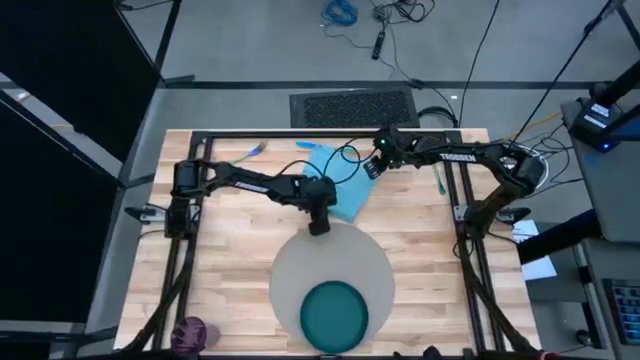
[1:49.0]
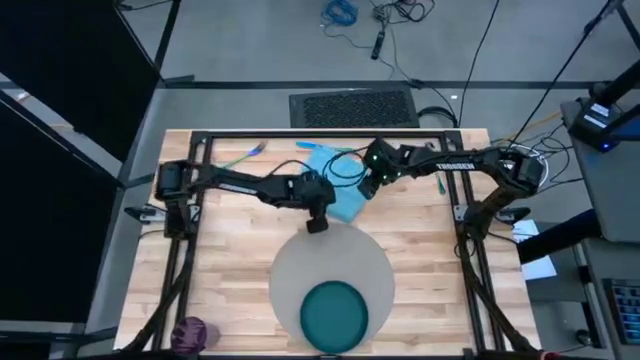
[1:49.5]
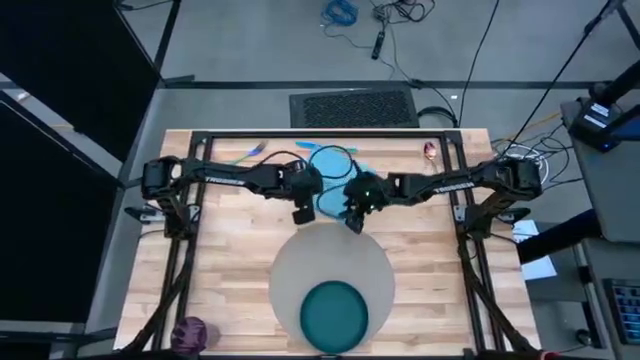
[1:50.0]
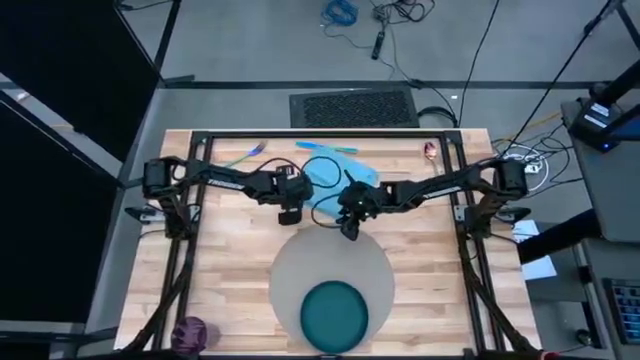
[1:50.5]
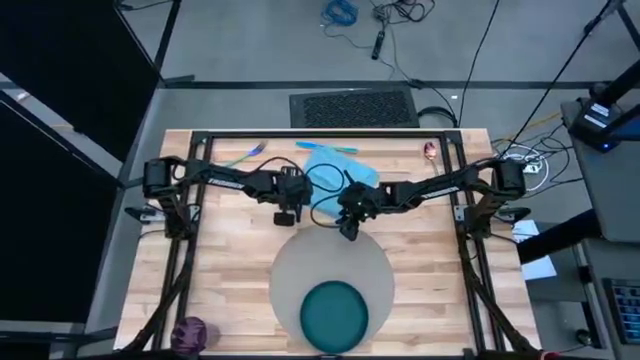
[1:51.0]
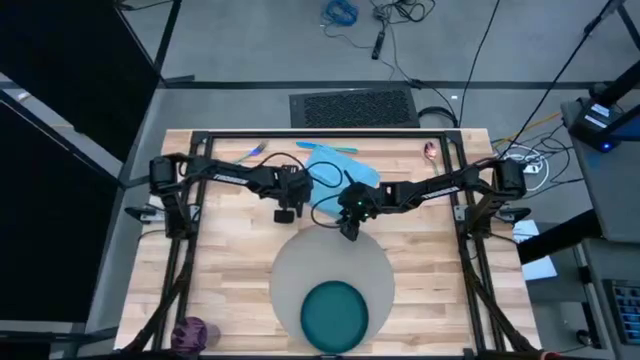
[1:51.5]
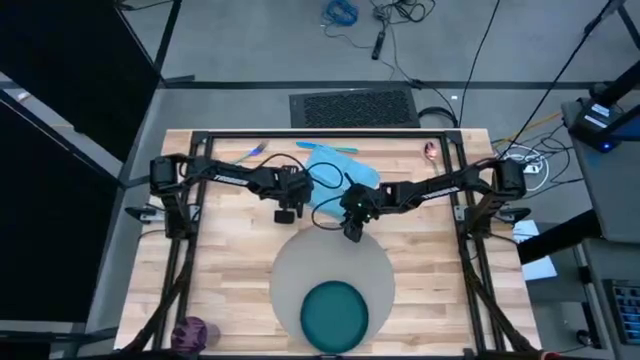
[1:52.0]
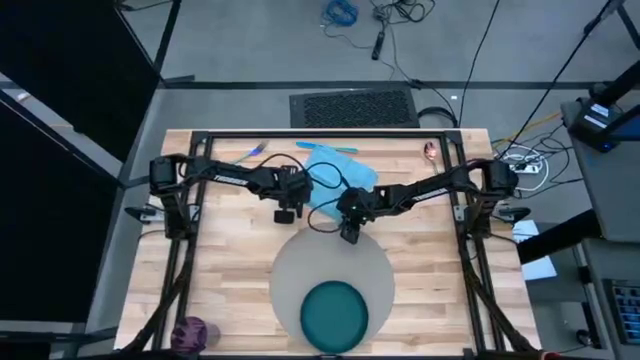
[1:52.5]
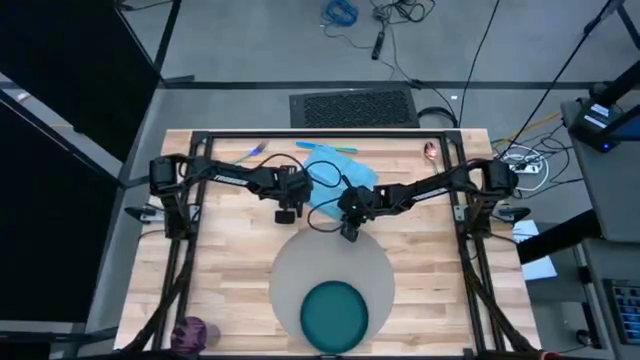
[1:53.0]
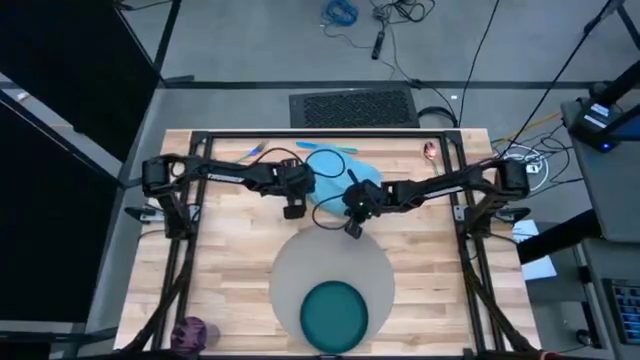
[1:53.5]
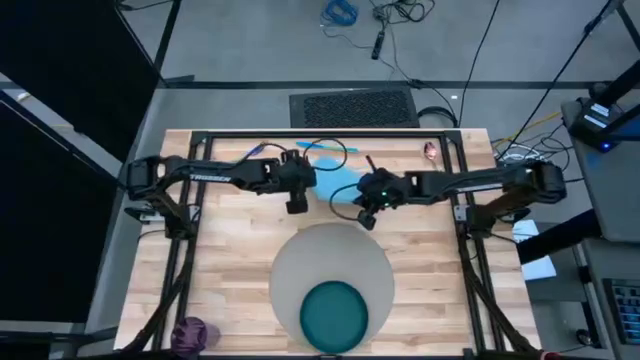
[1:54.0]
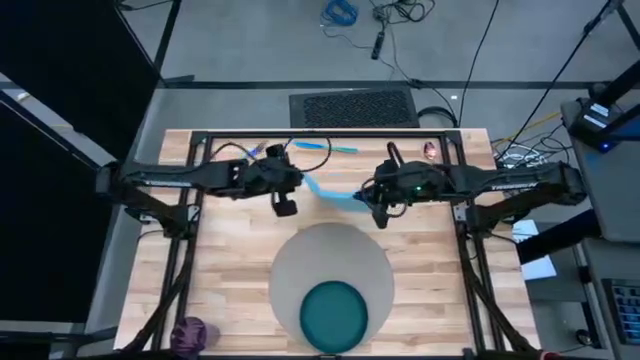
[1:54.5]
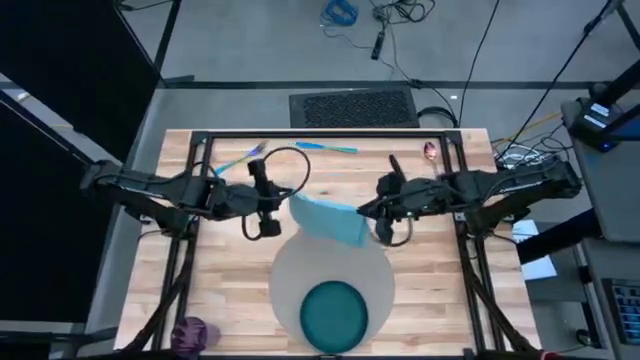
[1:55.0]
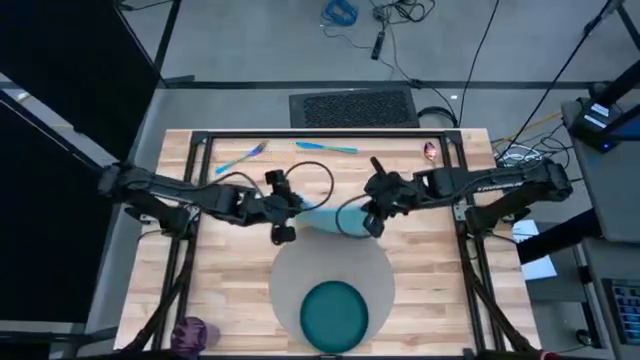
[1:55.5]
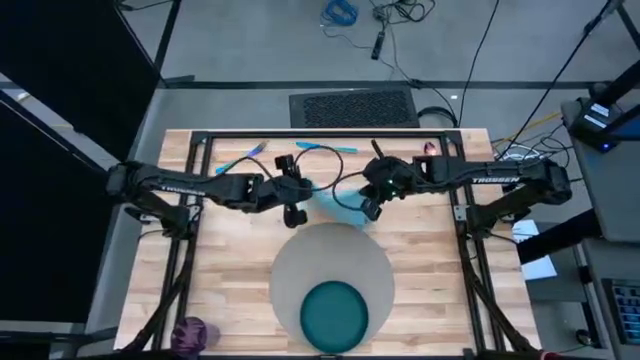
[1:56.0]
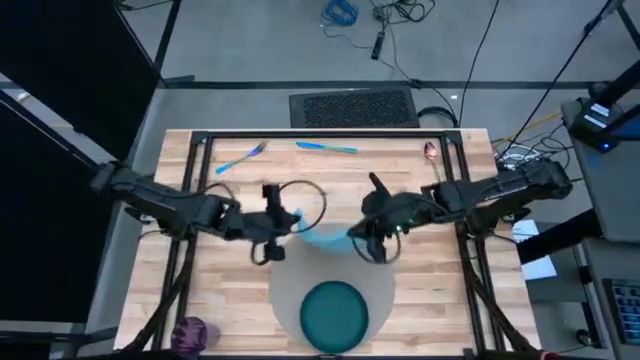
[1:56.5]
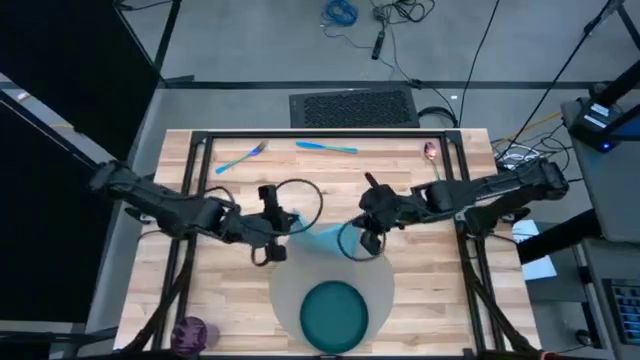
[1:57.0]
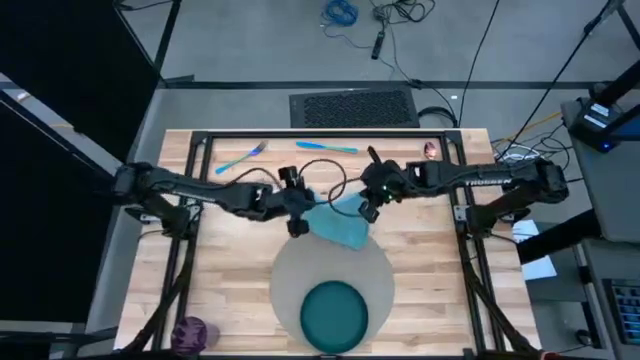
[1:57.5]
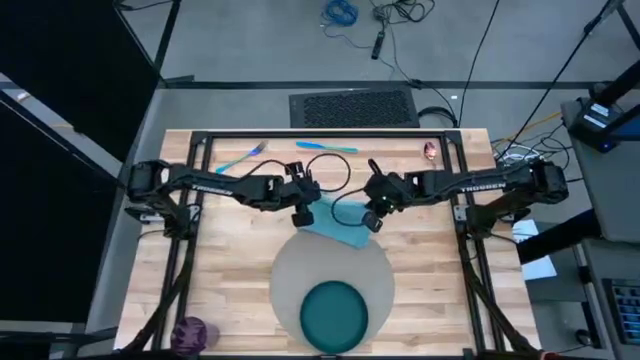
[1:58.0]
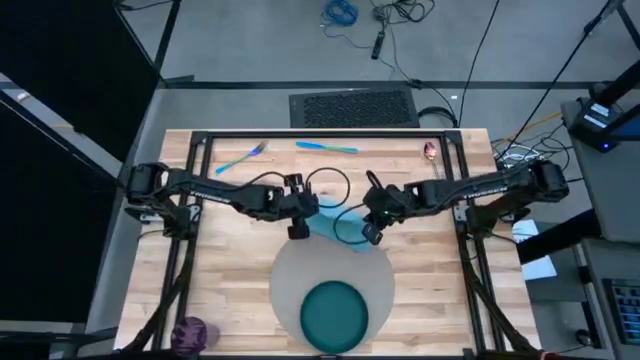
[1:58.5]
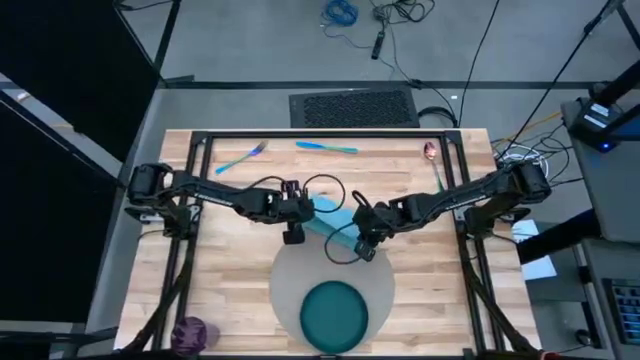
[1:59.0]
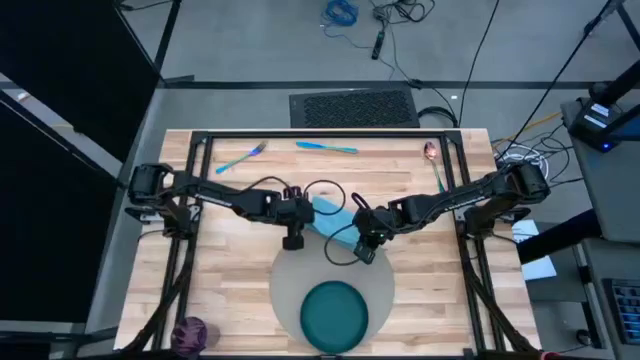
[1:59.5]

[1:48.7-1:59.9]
Task: Set table place
Fold the blue napkin

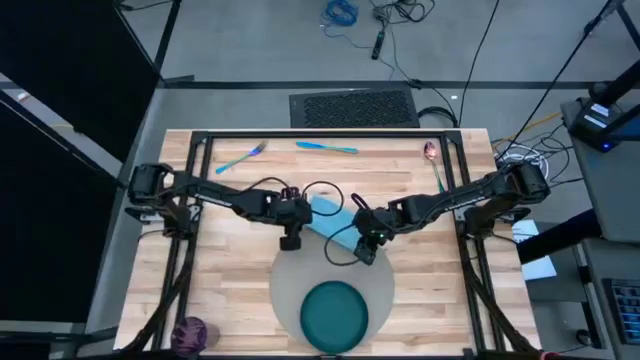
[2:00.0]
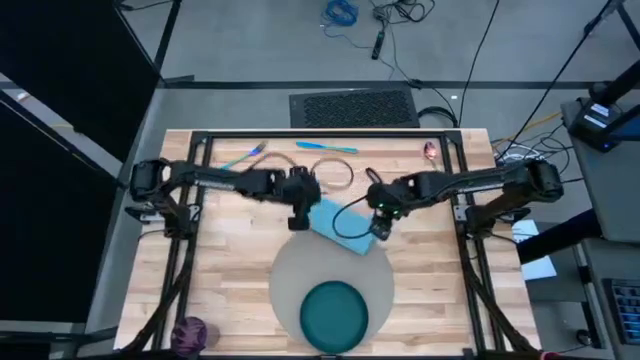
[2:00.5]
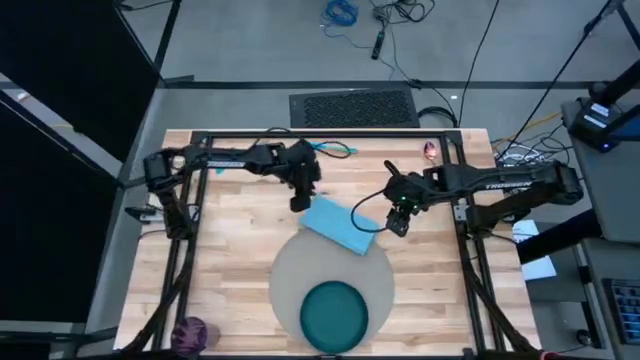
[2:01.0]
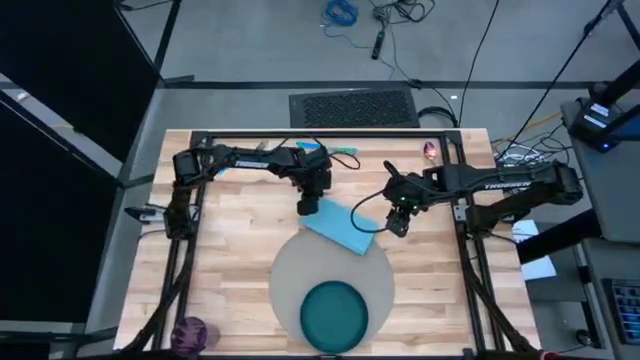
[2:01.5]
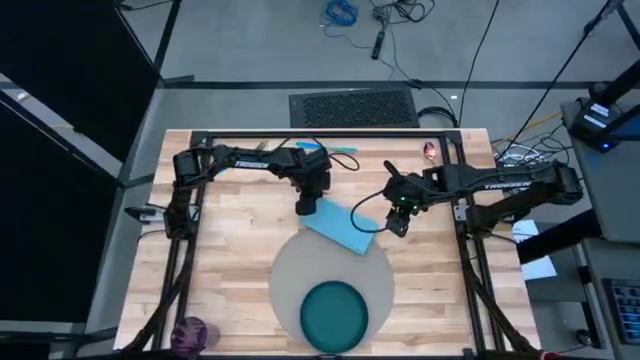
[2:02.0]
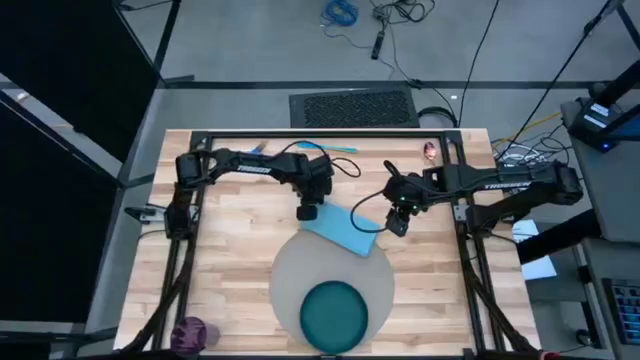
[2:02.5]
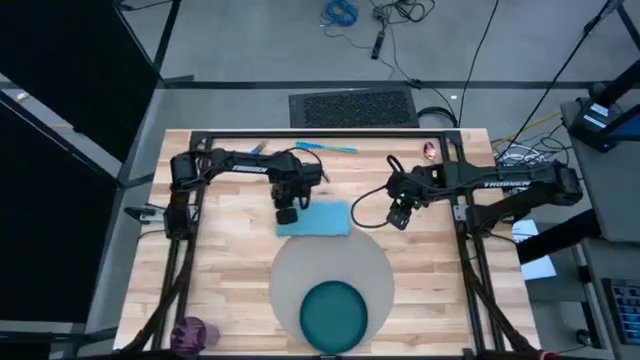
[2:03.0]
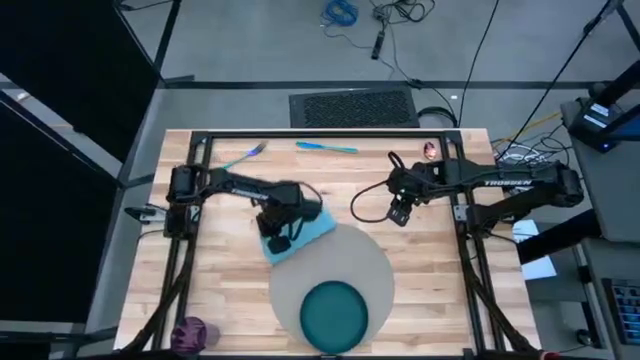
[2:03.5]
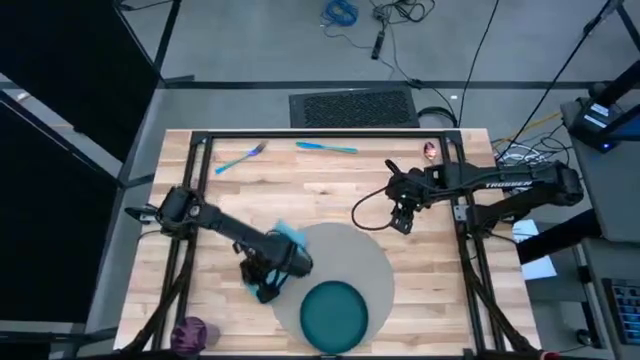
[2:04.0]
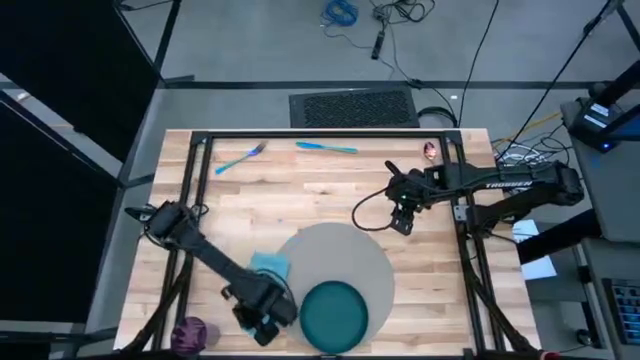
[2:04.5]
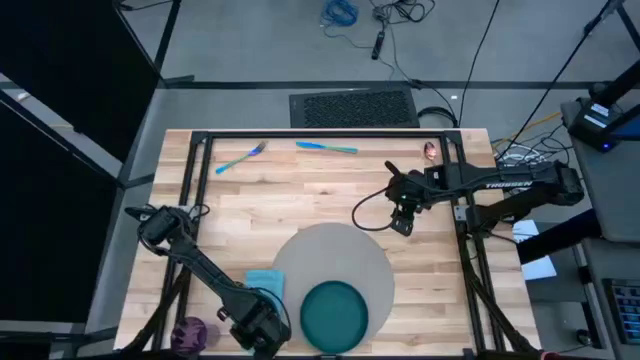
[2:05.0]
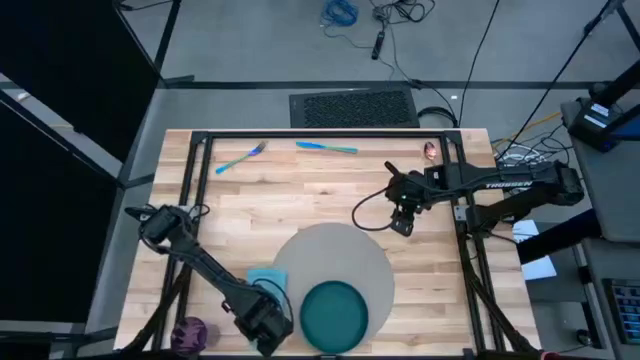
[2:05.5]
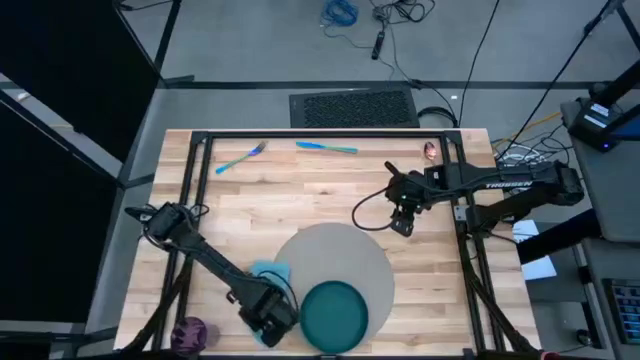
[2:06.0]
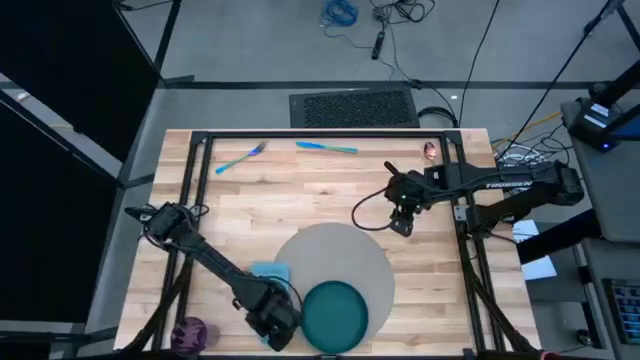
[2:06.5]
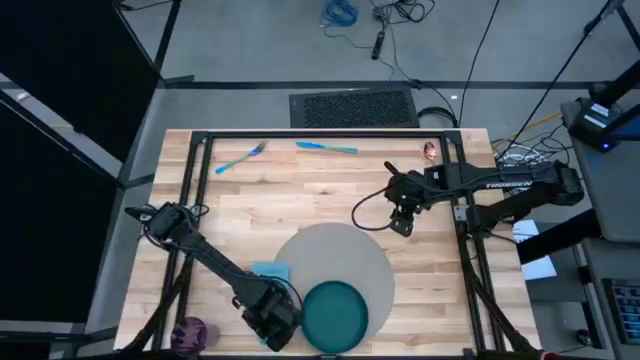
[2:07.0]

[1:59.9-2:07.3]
Put the blue napkin on the brown table mat to the left of green plate

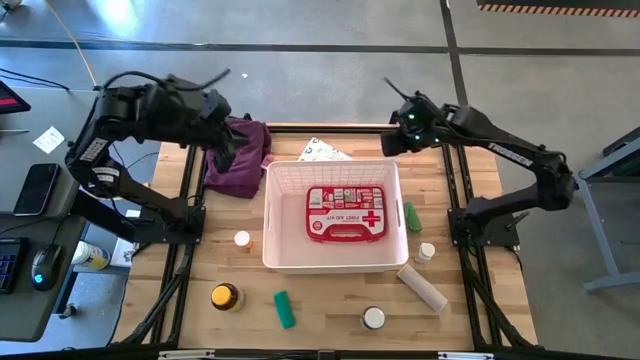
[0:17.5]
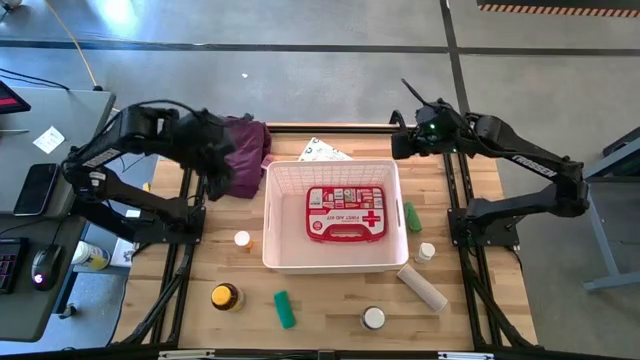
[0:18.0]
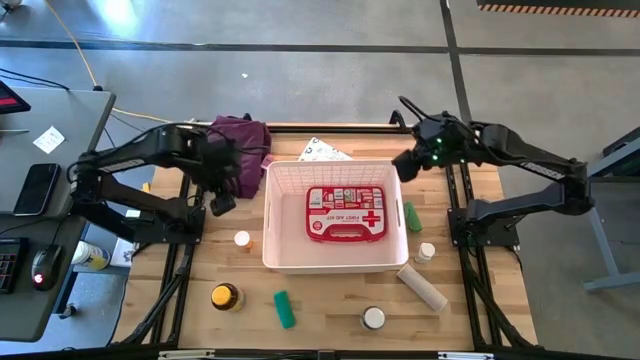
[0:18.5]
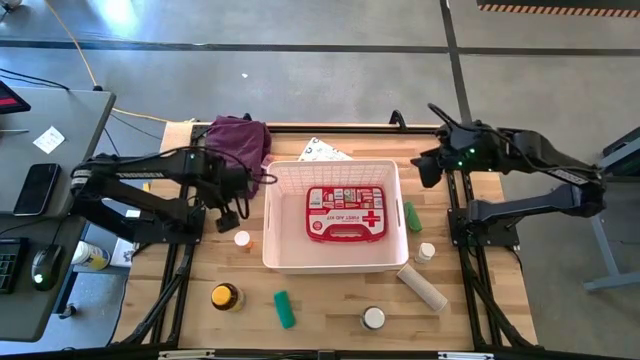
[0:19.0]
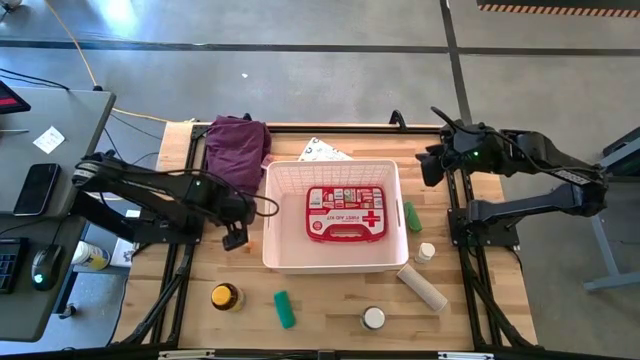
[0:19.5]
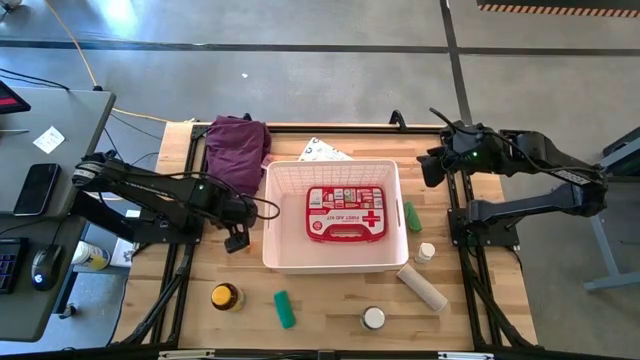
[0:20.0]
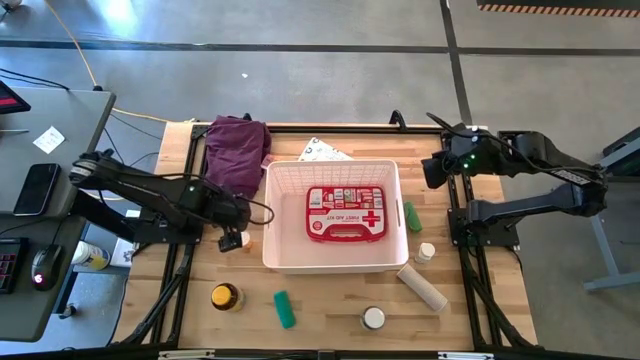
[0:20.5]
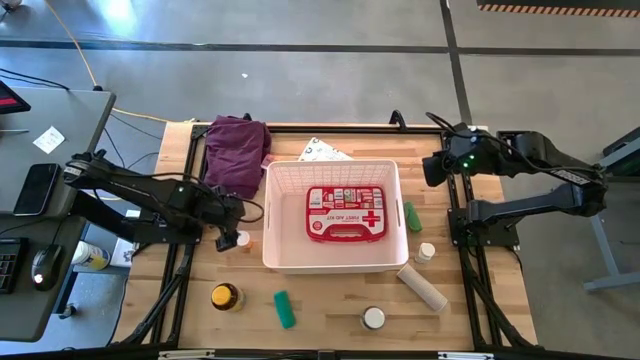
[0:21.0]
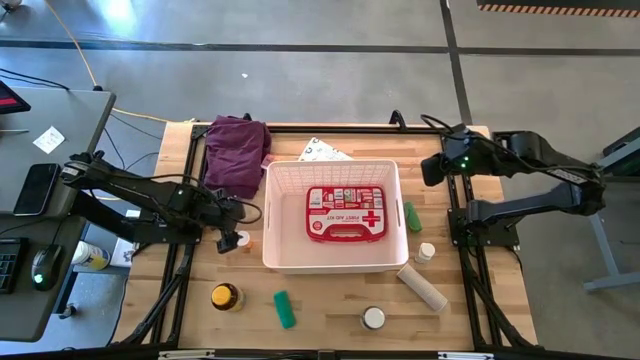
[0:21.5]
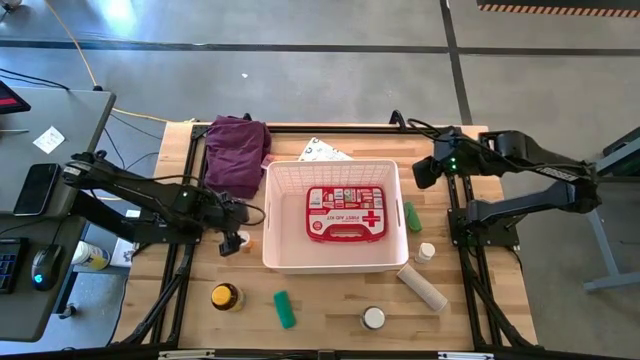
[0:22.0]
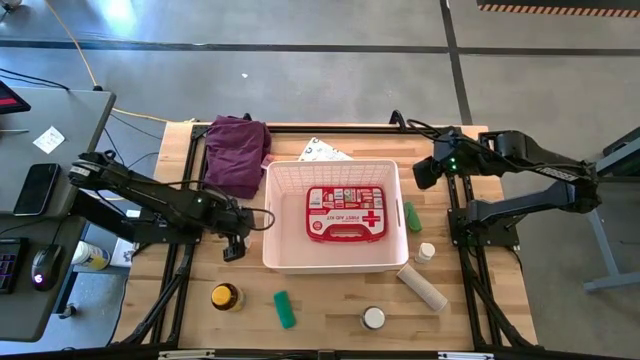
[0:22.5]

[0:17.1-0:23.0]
Task: Pick & place medical supplies in basket/bin
Put the orange medicine bottle into the white bin
